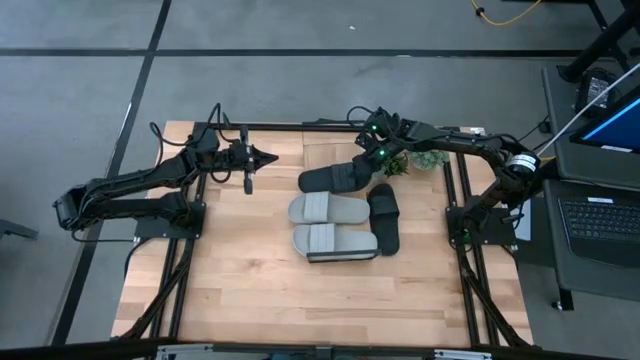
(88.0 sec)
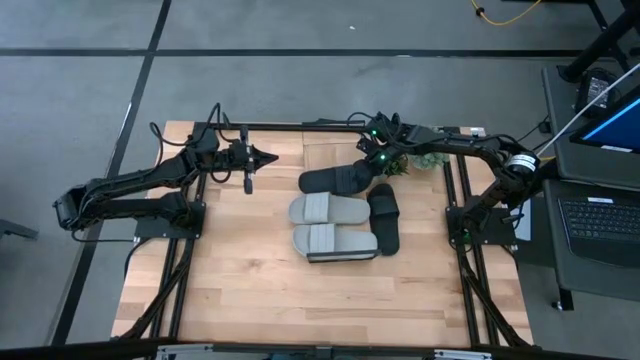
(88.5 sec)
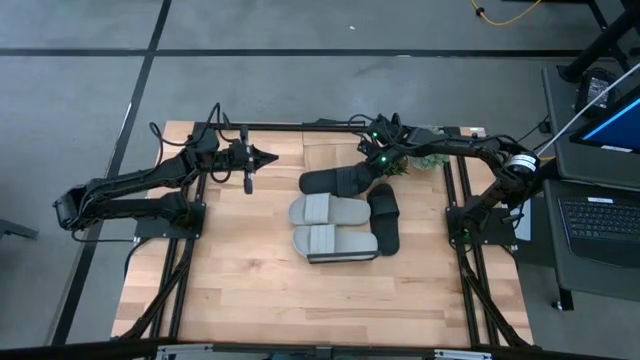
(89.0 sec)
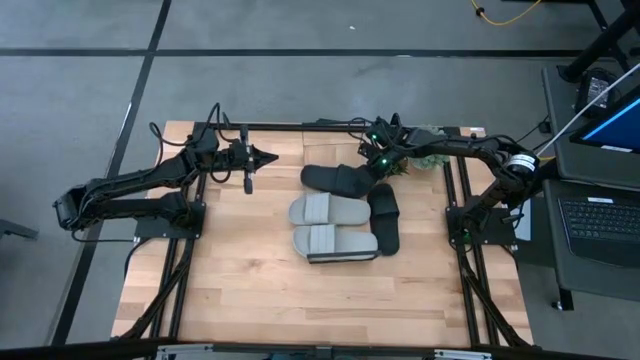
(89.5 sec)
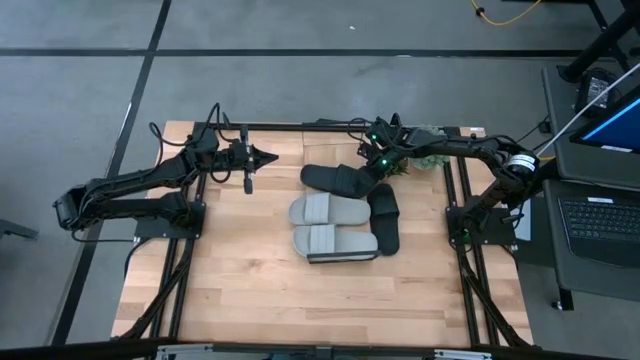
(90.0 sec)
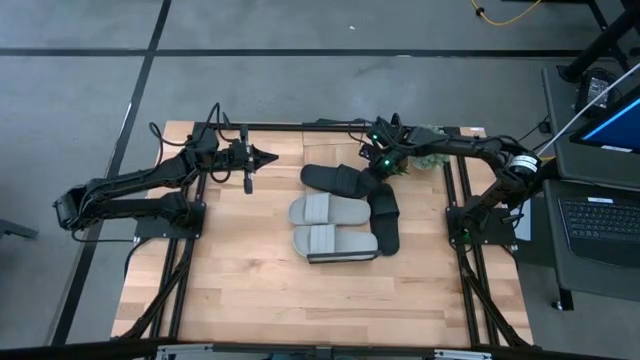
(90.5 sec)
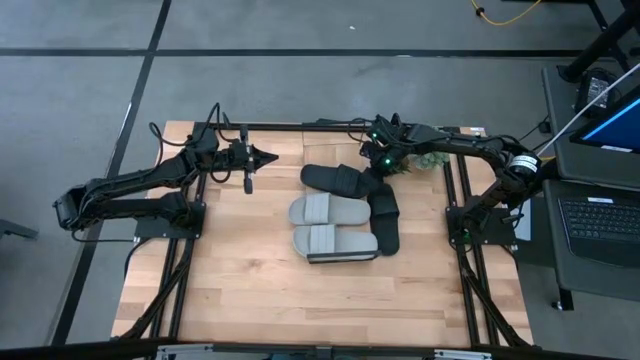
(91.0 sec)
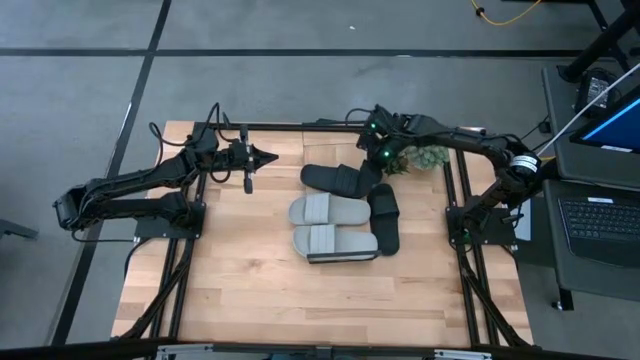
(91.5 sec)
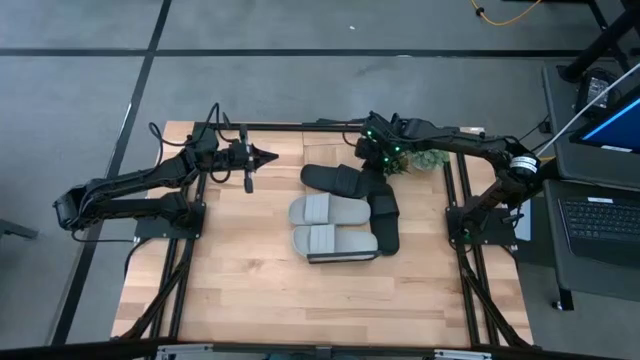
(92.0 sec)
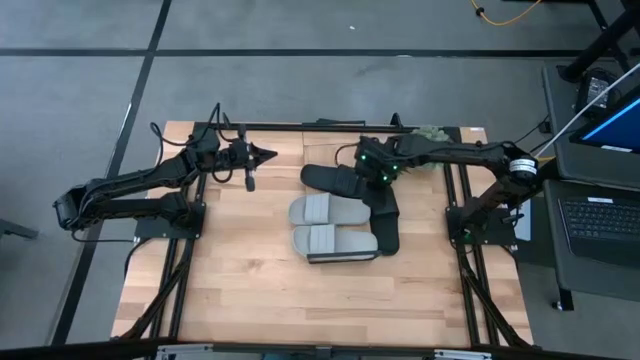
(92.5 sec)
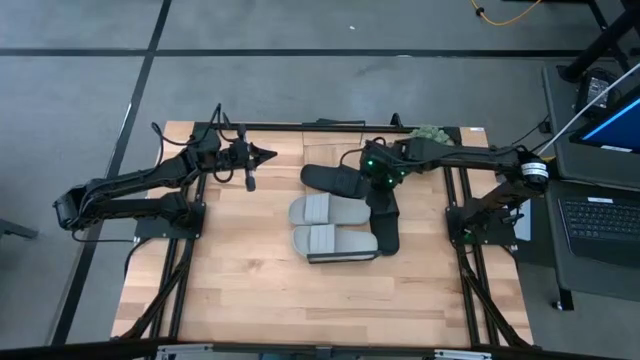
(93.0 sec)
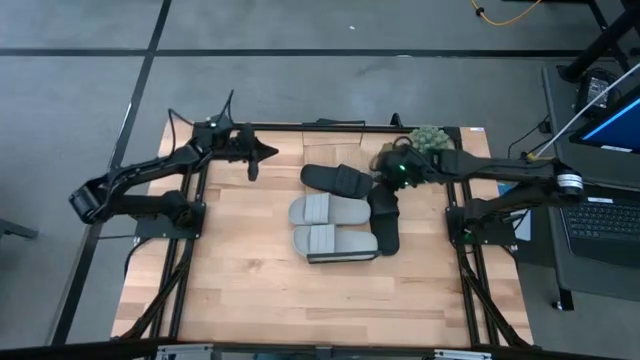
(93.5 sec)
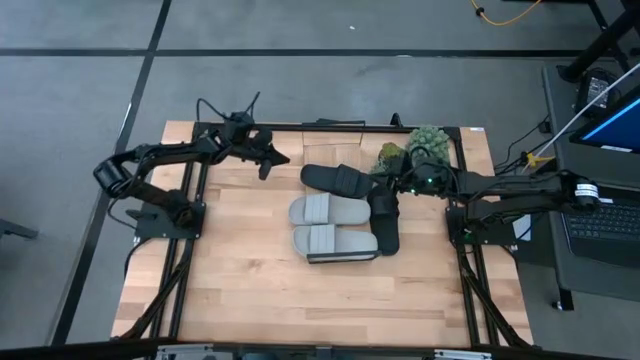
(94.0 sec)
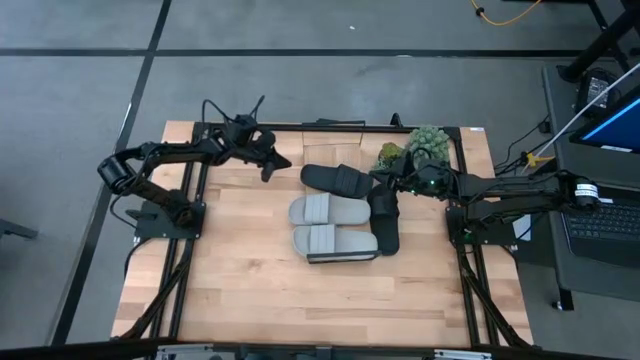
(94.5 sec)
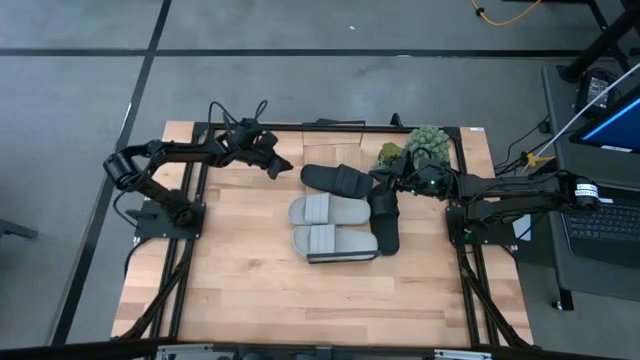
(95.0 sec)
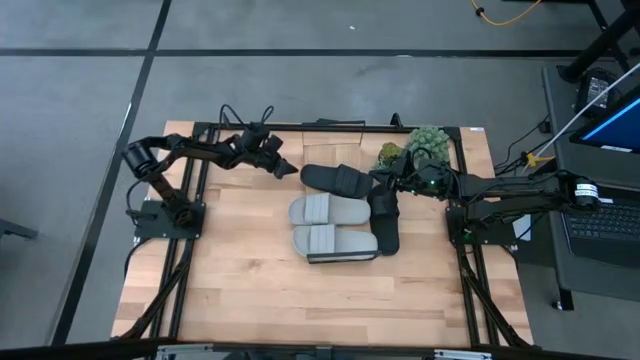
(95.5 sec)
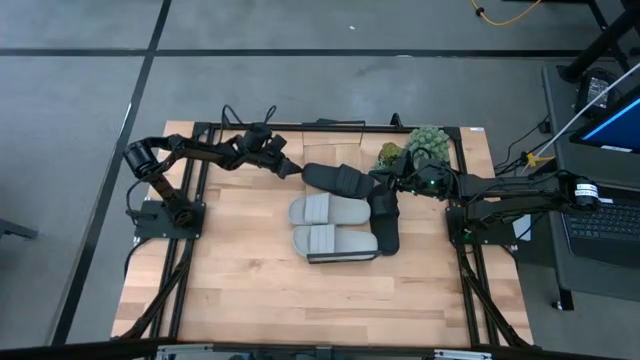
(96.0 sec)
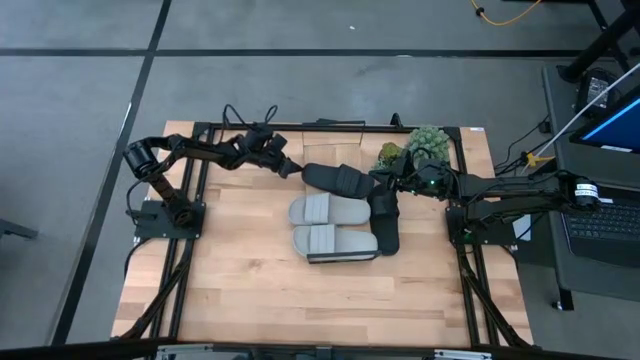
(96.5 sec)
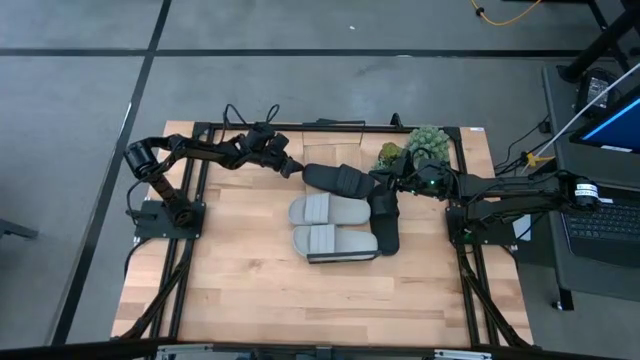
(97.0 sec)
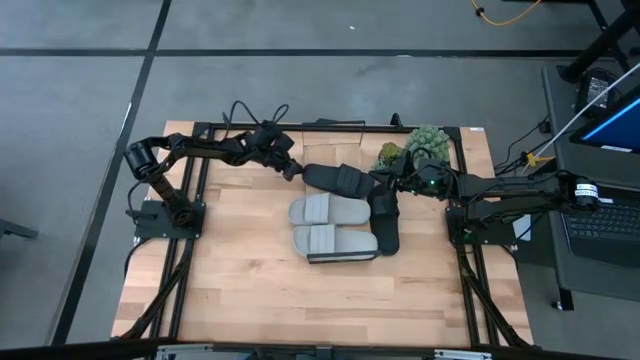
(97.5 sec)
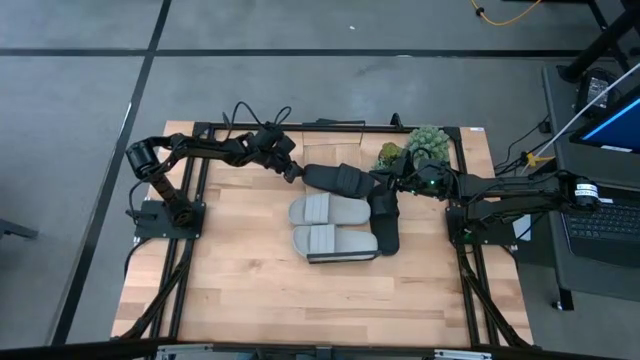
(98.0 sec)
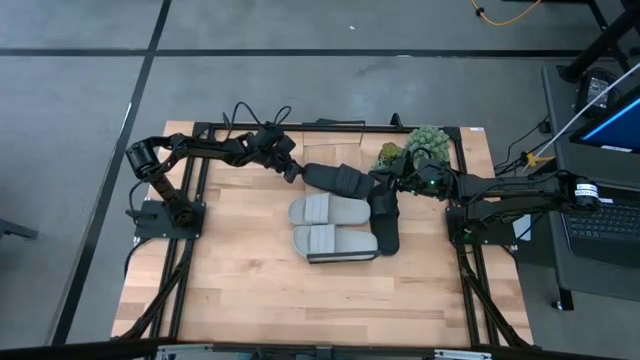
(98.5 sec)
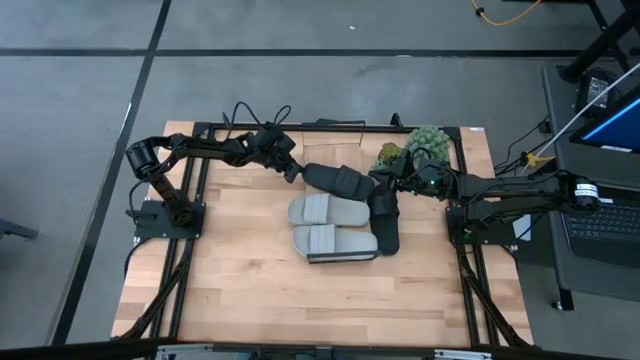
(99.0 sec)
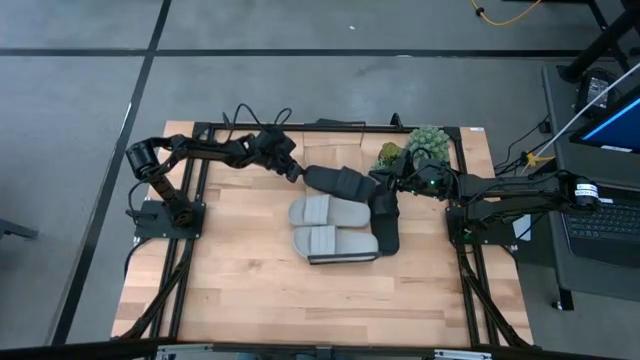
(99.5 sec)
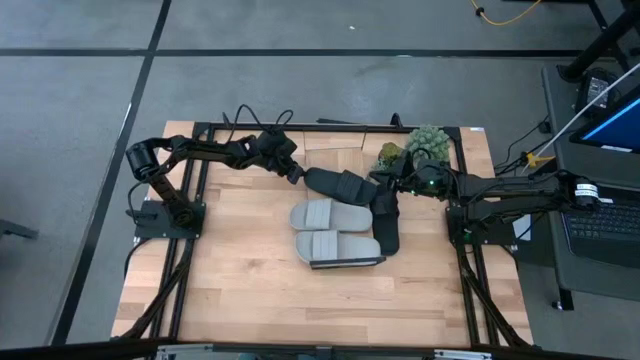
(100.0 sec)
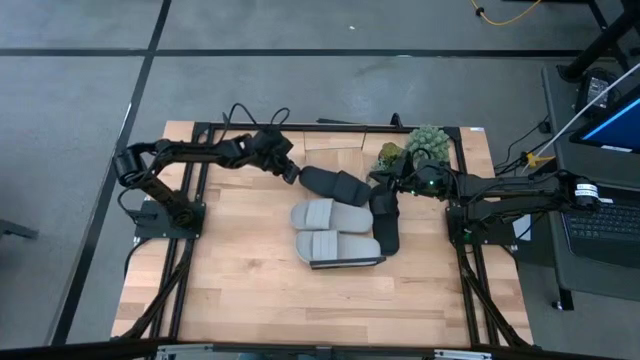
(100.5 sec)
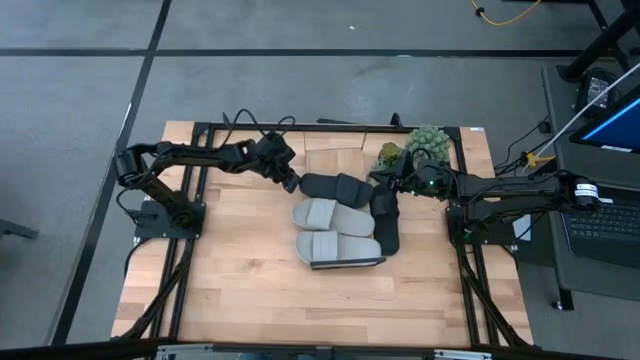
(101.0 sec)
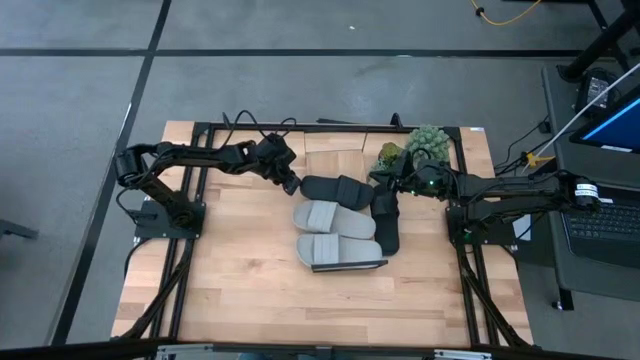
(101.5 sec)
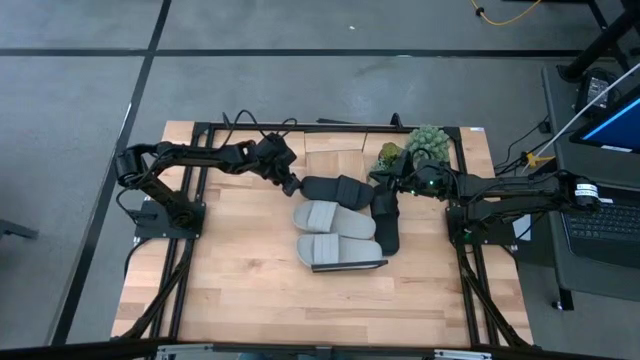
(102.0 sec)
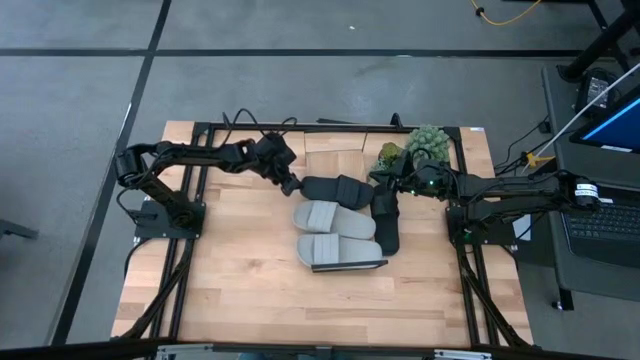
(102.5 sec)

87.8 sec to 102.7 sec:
Task: Pick and place slides into the shelf
Put the bottom black slipper on the shelf

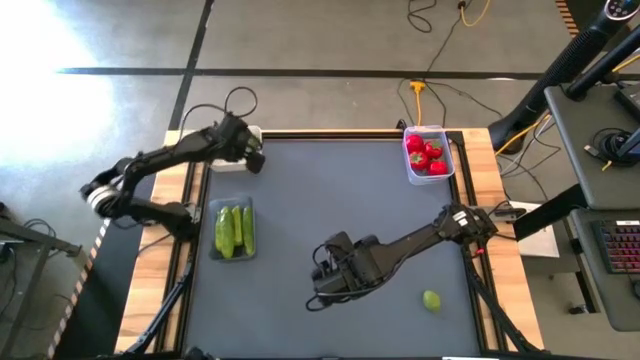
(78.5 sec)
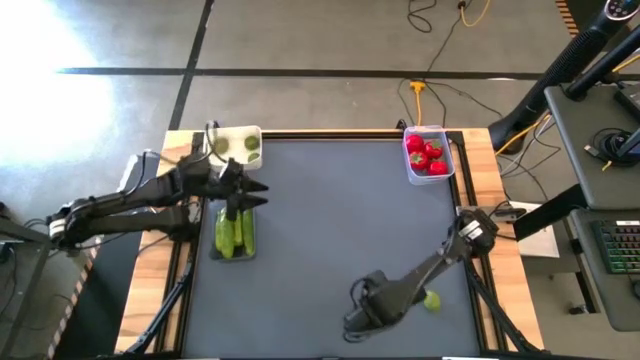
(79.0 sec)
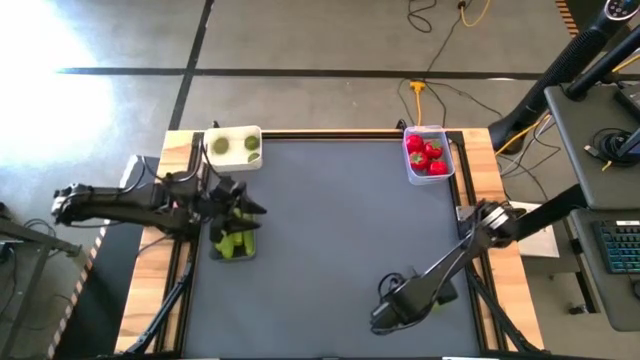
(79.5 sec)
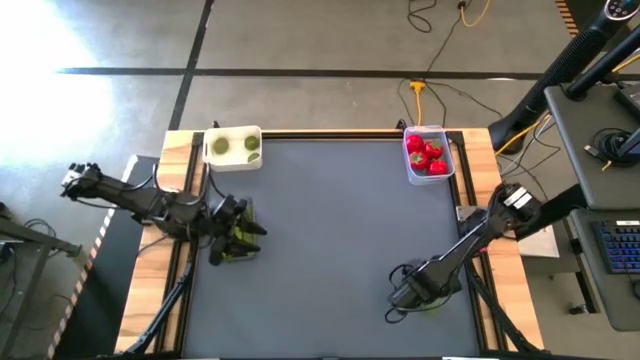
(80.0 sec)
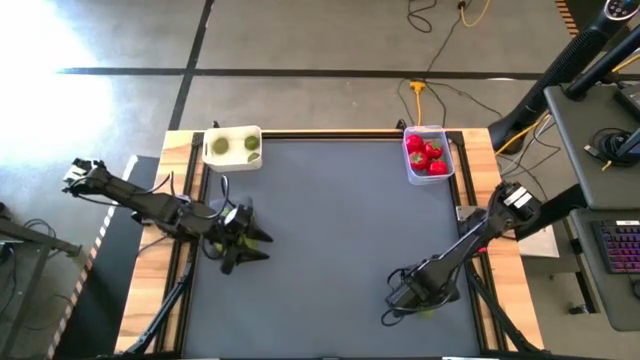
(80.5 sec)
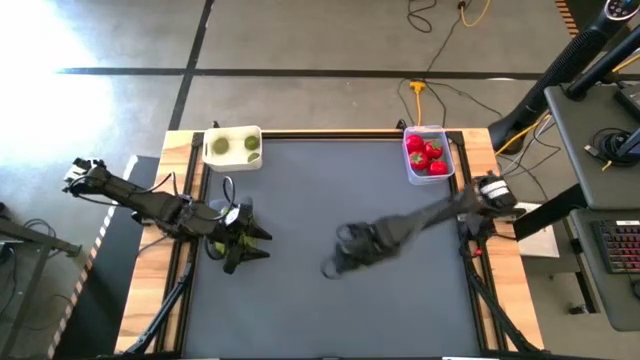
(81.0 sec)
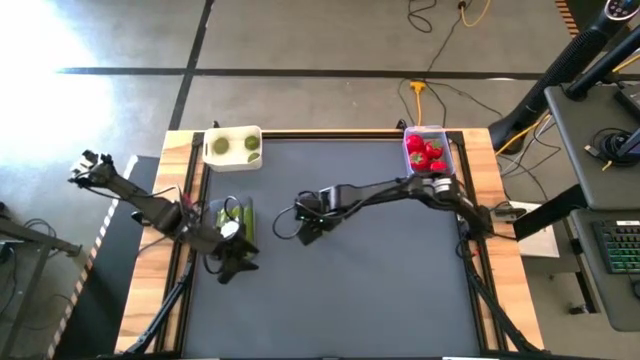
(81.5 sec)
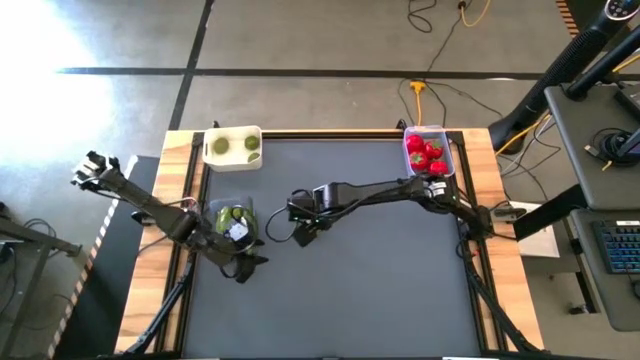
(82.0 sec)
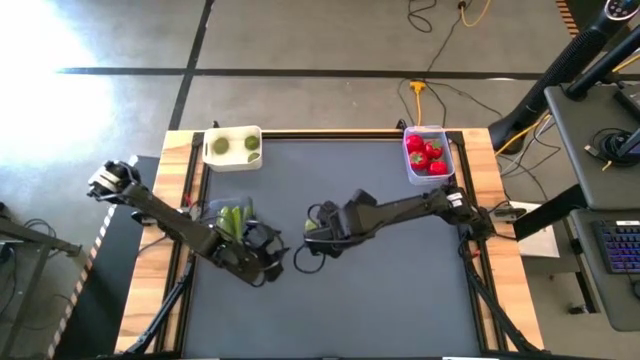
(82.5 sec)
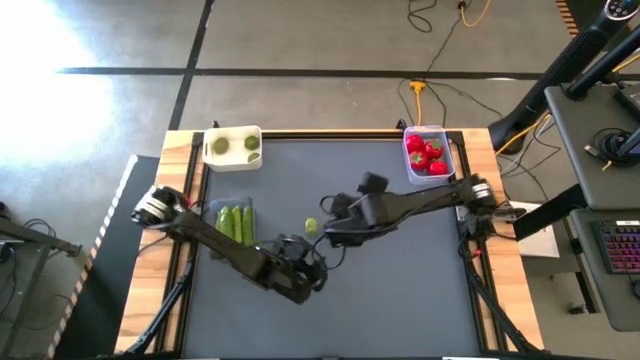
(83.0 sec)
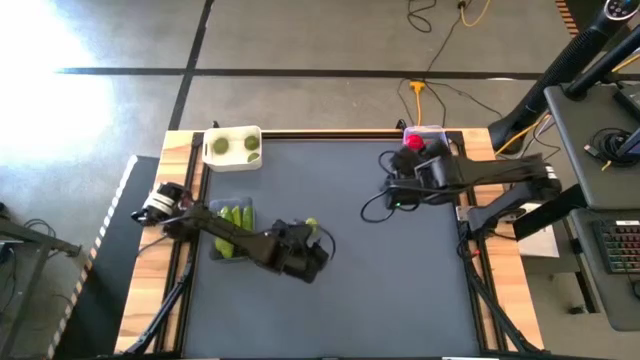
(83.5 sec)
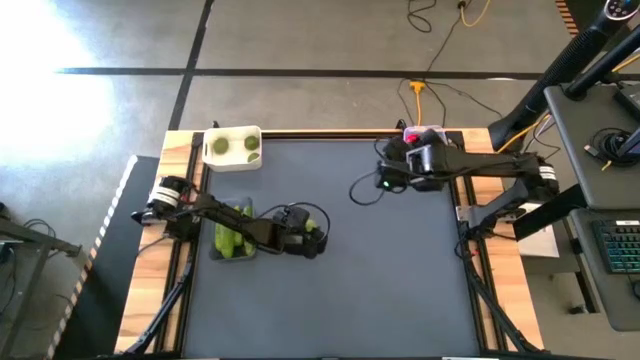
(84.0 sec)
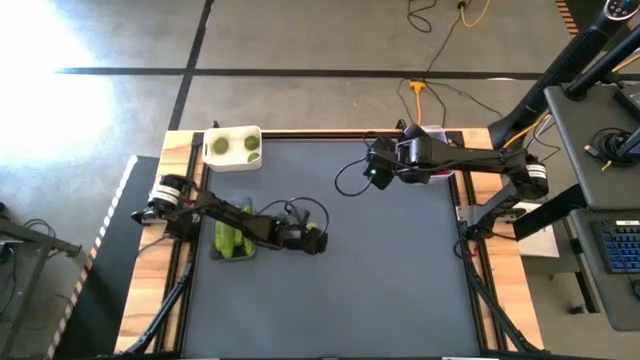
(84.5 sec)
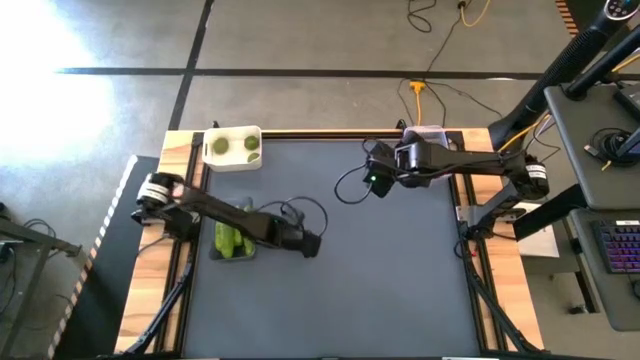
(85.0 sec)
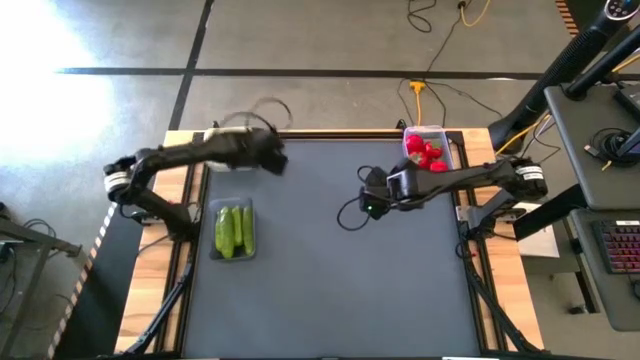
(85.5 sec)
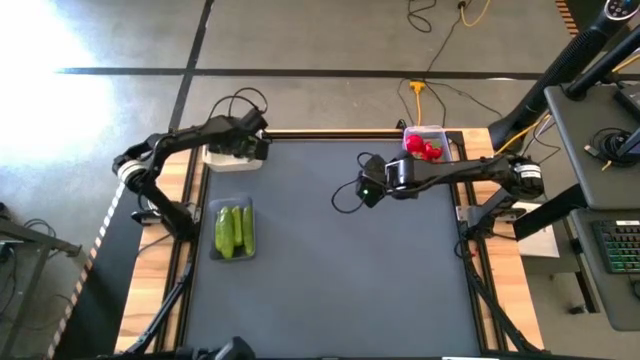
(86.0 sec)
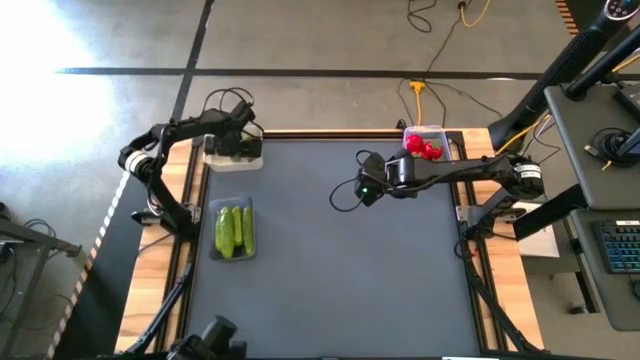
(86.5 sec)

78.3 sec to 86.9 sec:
Task: Sort produce into baskets
Put the green lime into the white bin
